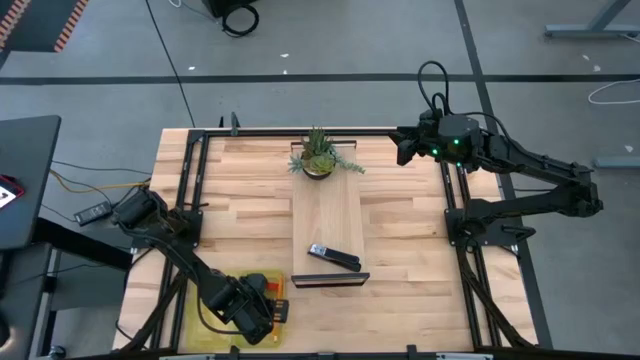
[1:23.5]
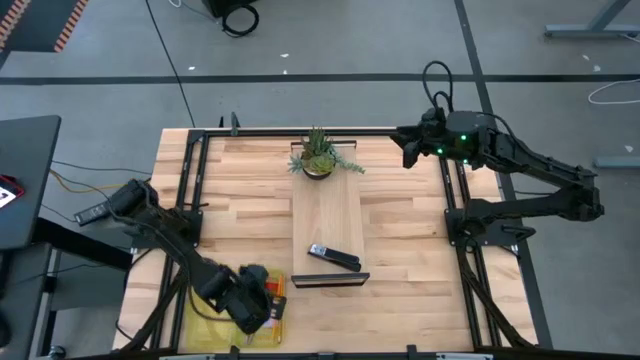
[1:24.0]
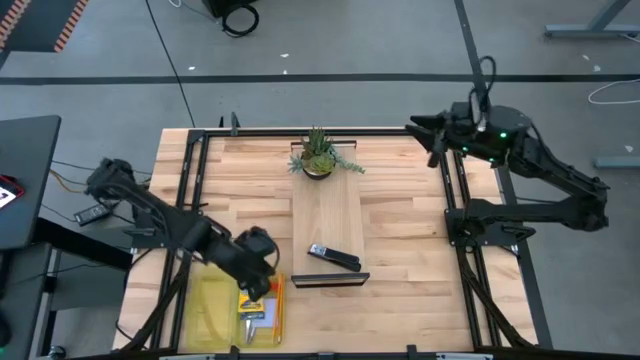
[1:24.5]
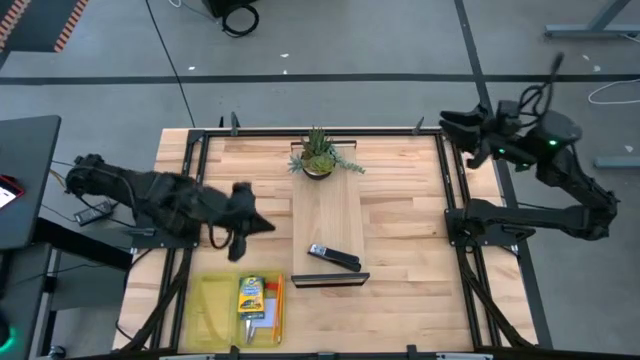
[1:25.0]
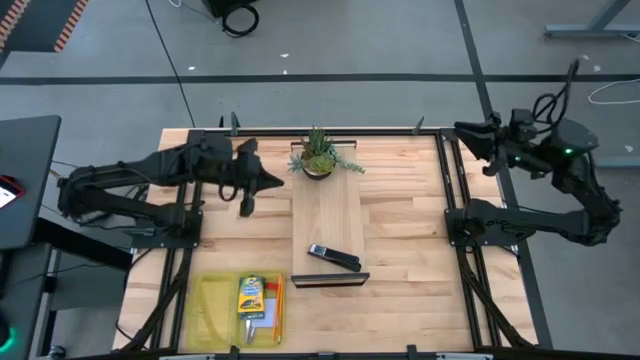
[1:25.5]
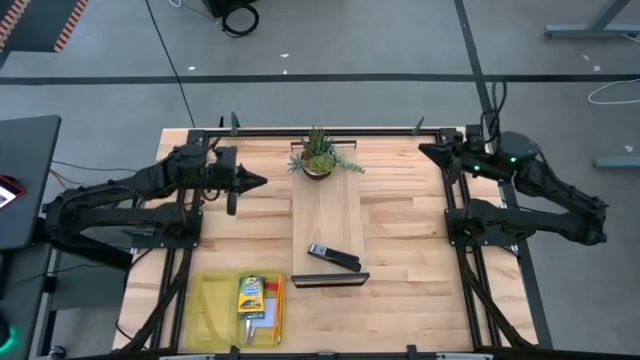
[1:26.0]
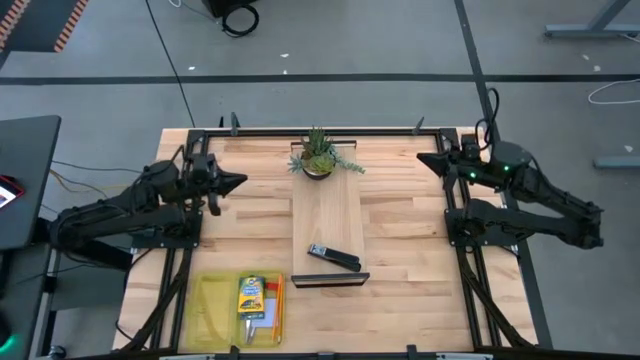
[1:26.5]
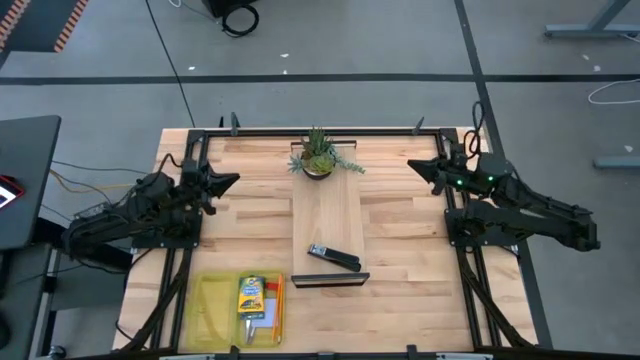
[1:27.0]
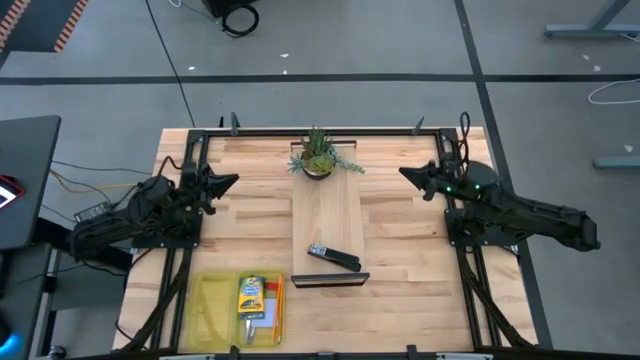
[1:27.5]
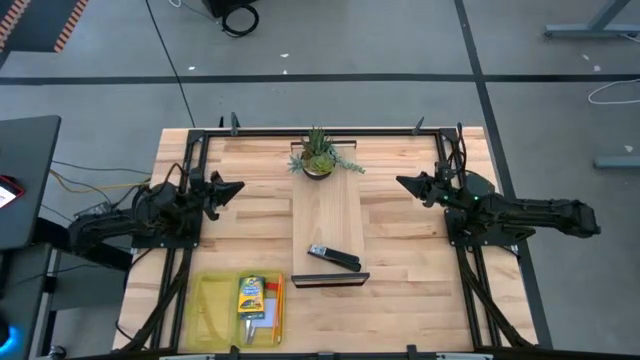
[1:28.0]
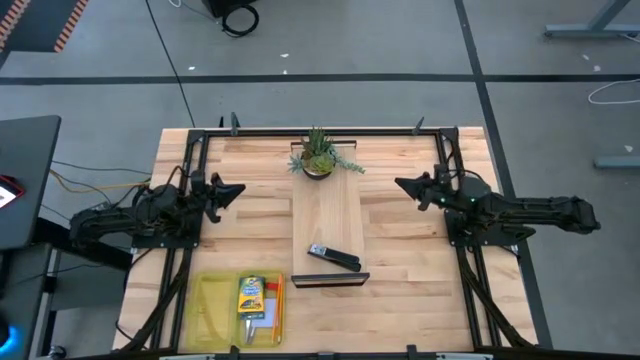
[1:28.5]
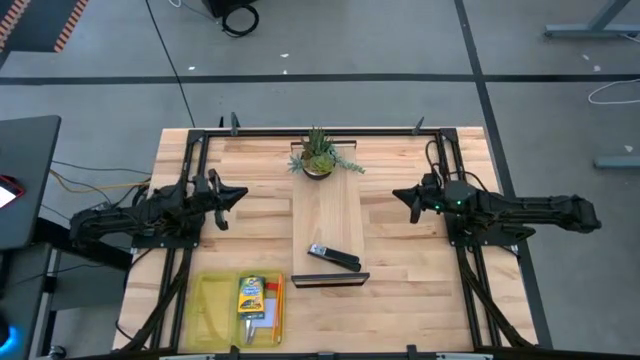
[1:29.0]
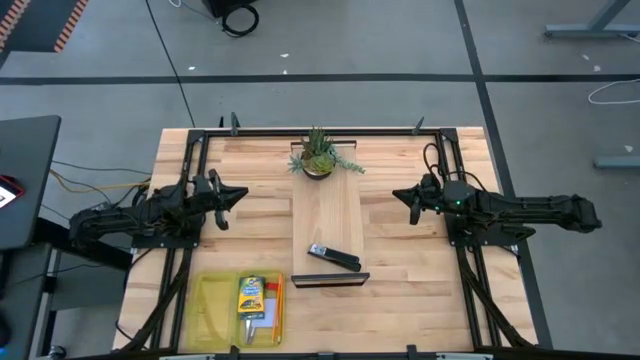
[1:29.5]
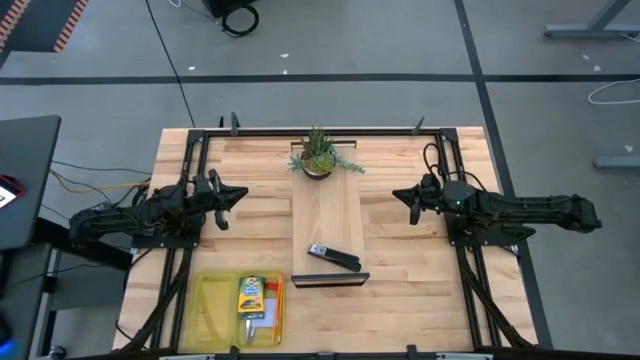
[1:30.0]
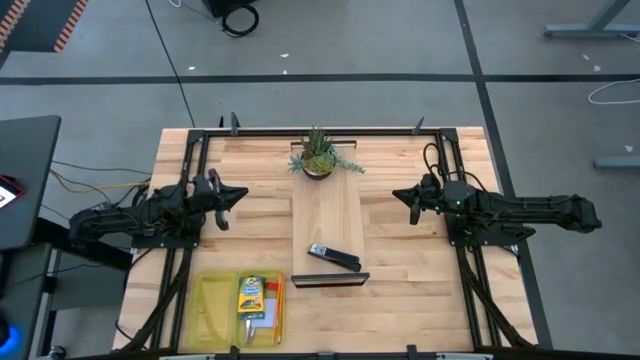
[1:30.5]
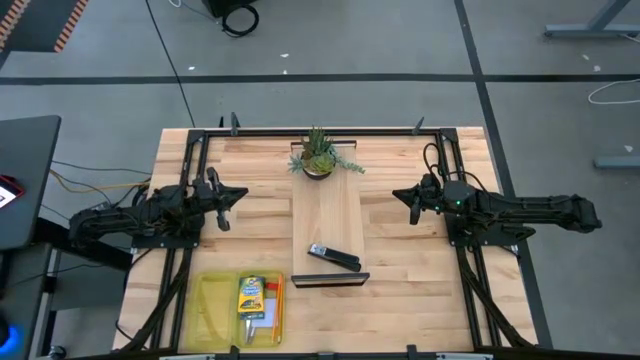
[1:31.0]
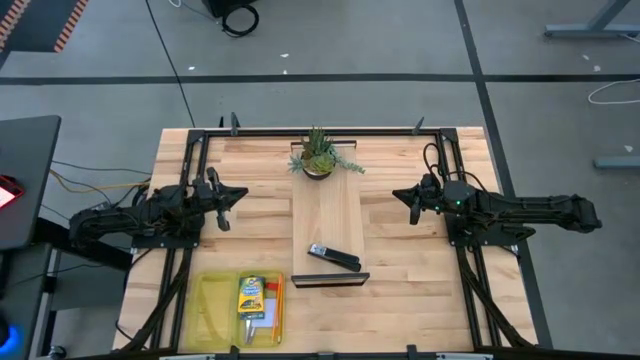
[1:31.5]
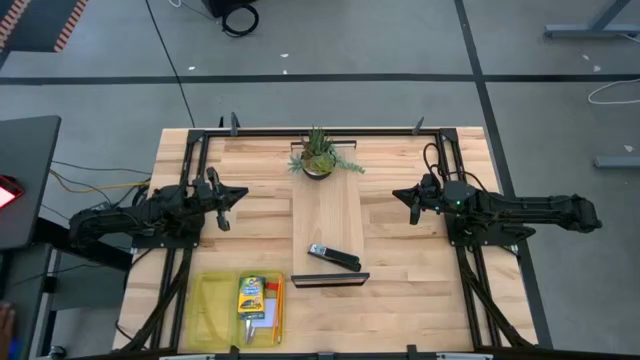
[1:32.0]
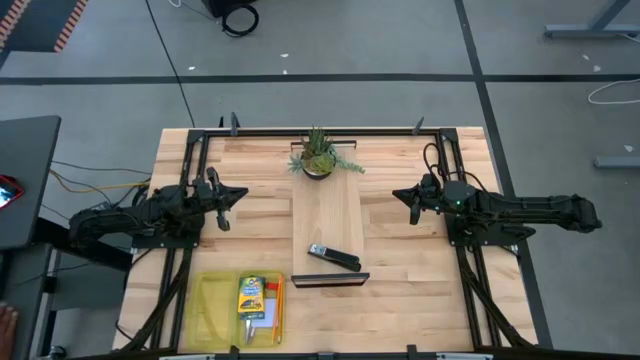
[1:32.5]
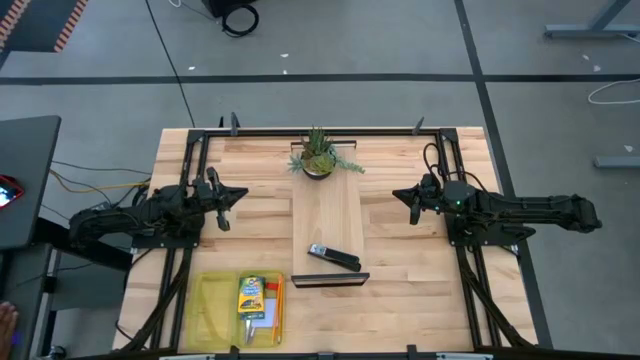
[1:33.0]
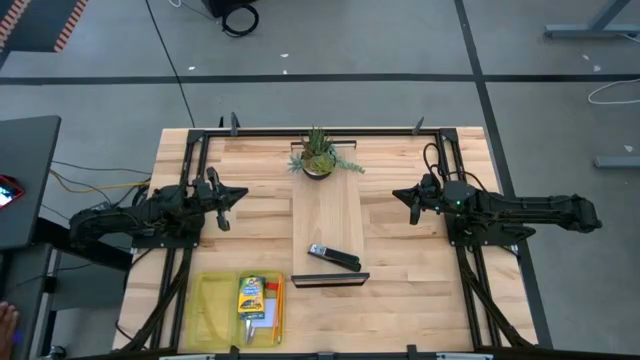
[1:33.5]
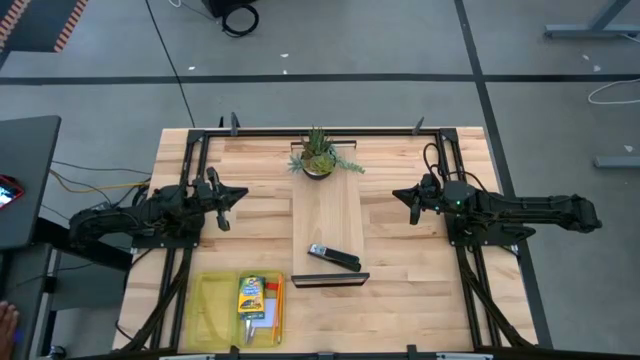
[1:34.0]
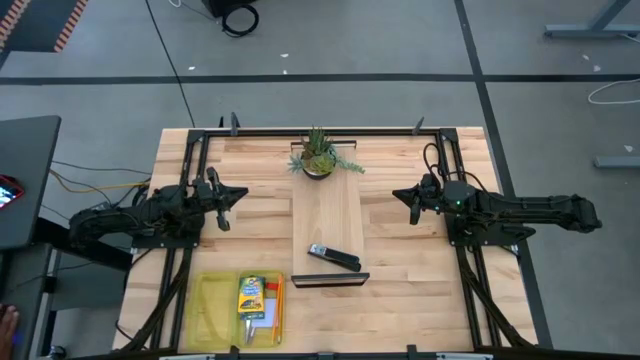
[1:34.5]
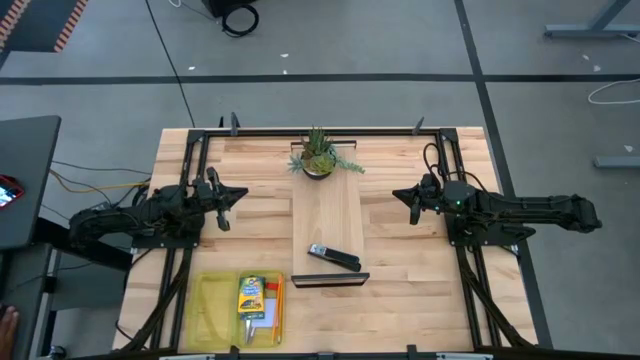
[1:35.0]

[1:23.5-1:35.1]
Task: Pack school essentials
Return to Home Position

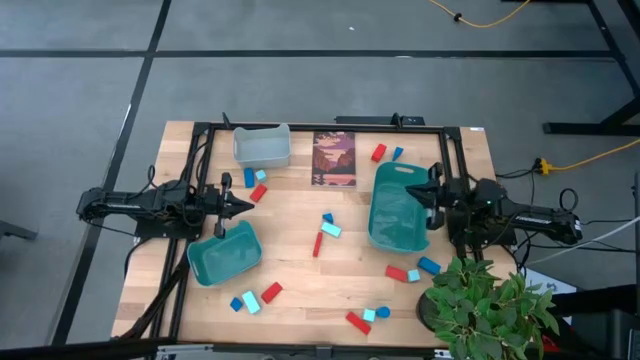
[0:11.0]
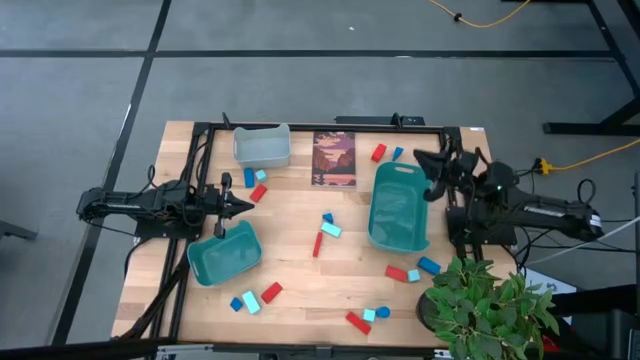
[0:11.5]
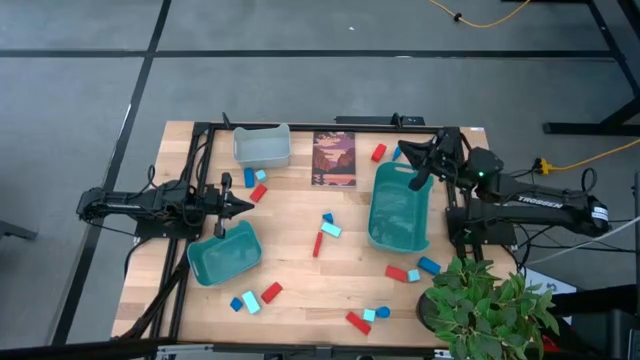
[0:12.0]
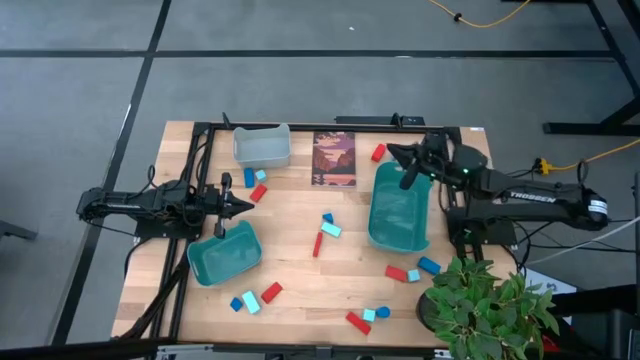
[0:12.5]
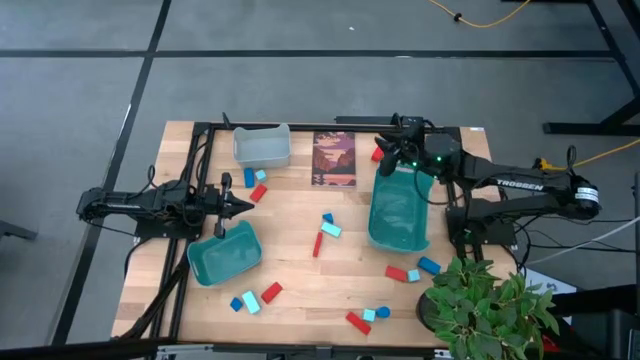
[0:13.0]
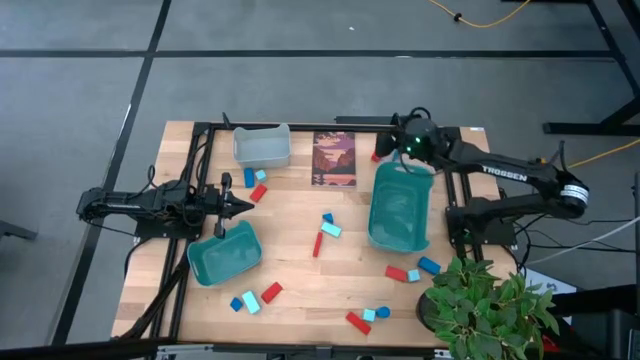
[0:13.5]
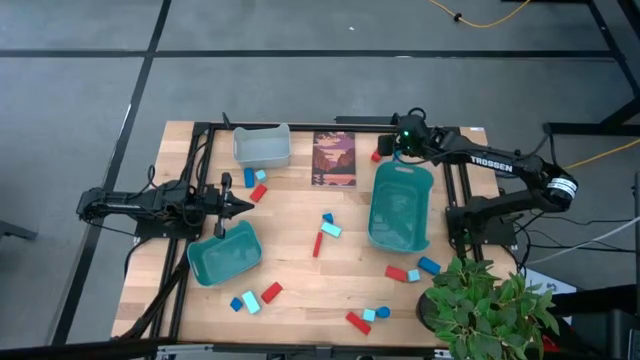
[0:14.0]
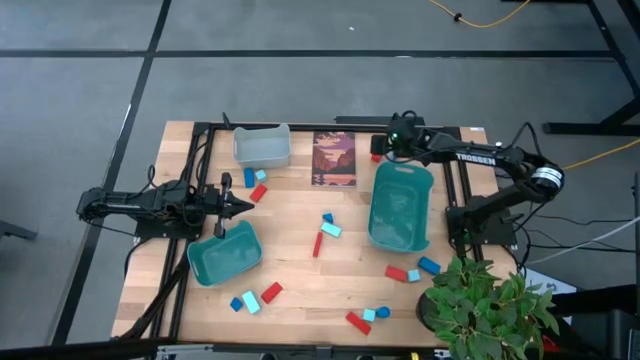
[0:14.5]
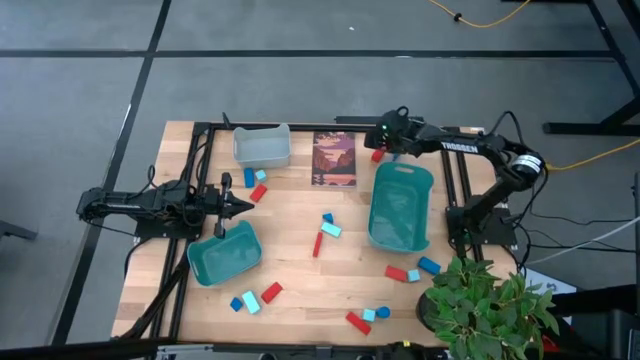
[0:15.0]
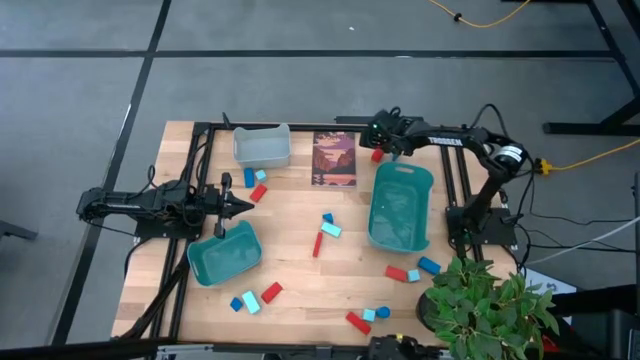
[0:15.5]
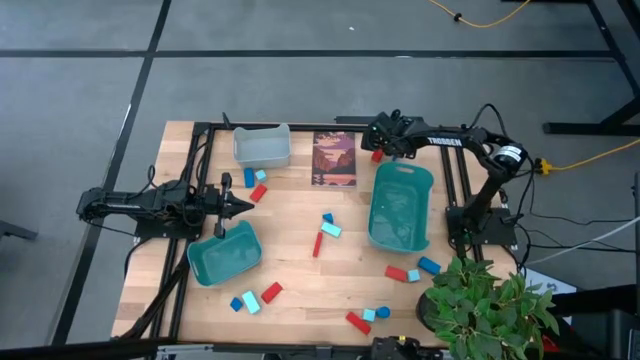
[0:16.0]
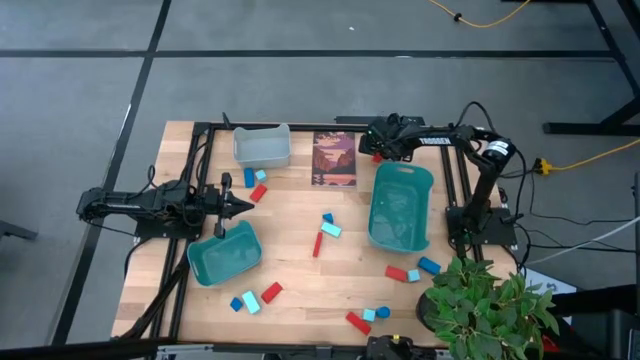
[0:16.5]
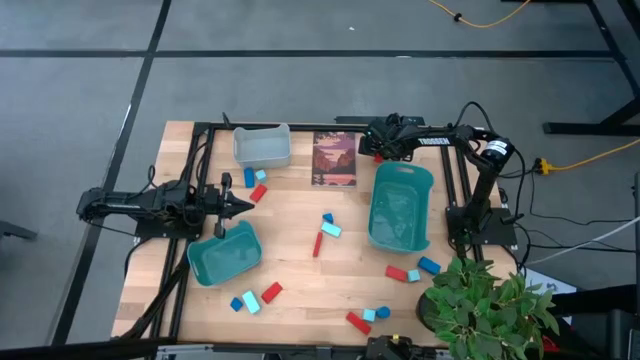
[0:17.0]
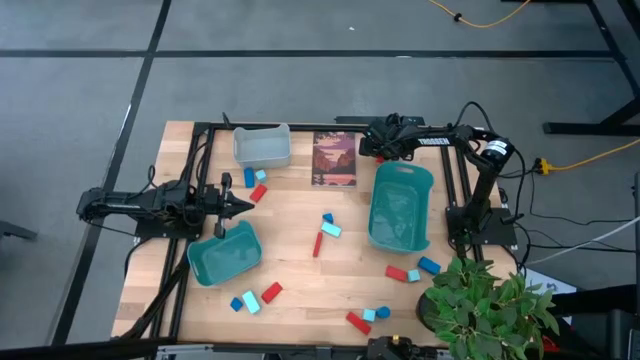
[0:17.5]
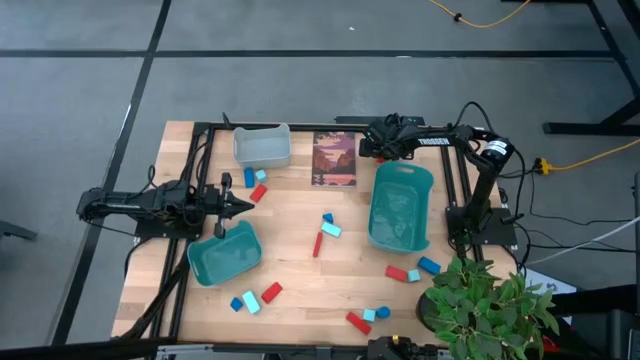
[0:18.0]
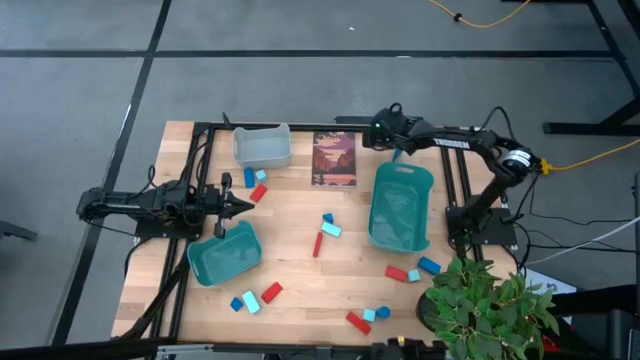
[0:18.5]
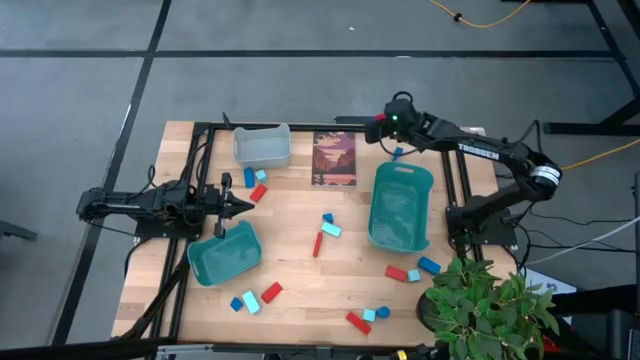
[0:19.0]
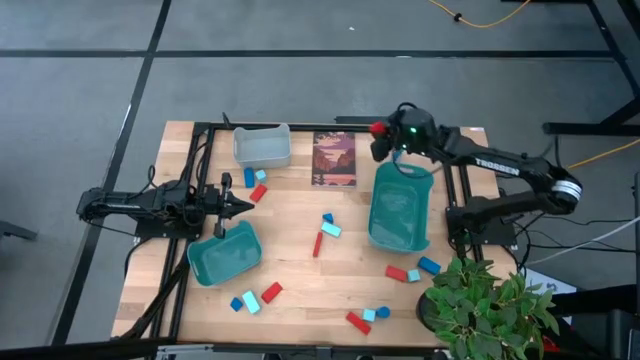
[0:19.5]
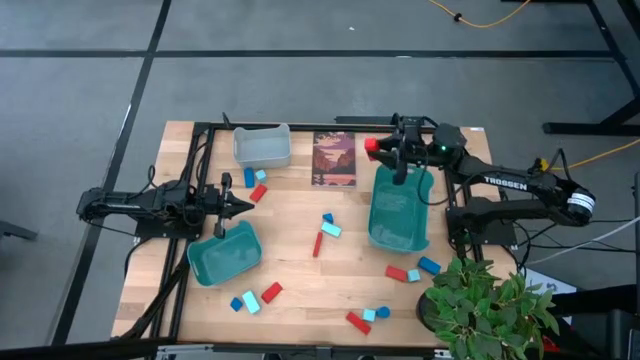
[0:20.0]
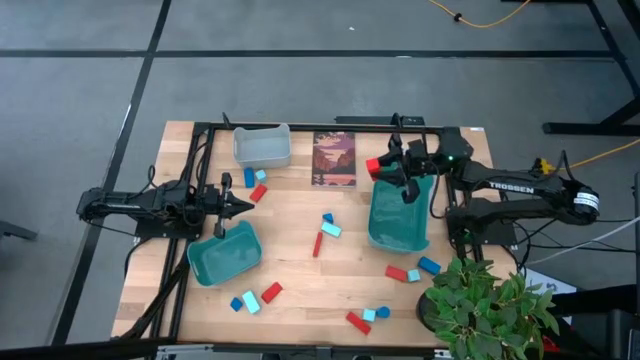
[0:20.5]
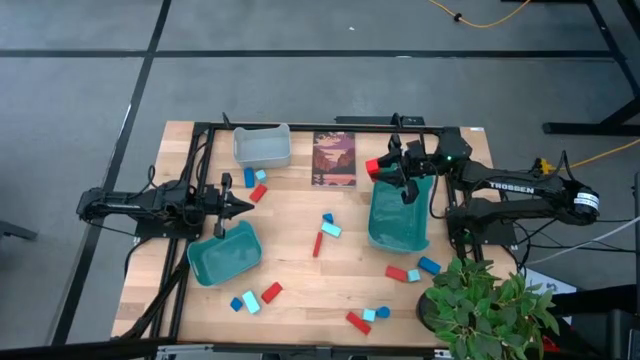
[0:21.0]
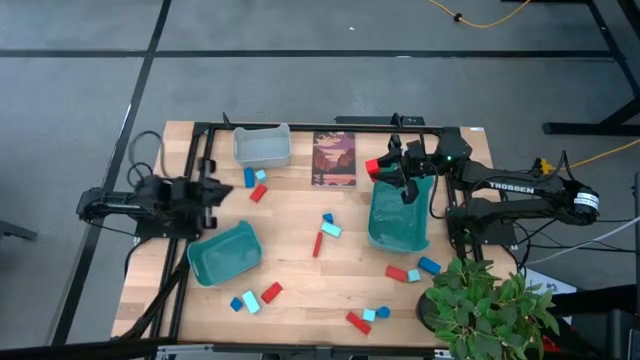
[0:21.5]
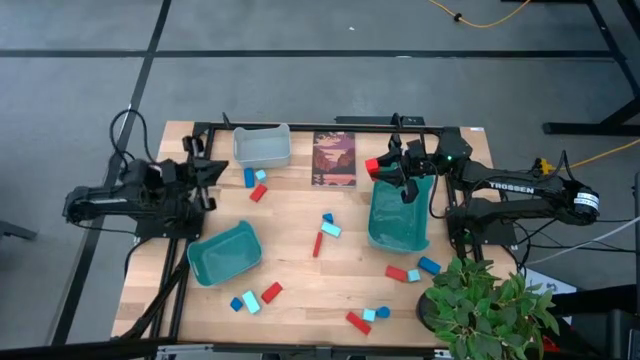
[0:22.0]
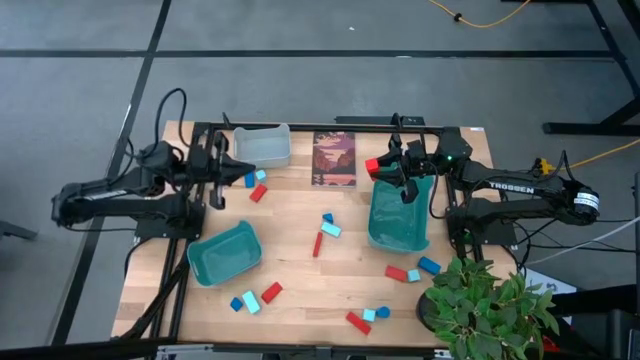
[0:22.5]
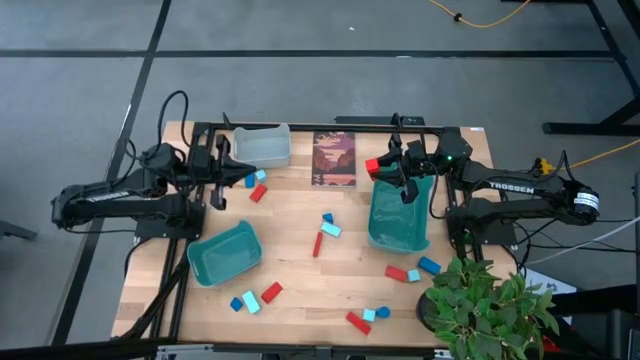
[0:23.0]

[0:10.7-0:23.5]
Task: Sort & place blocks by color
Put the red block into the gray bin
